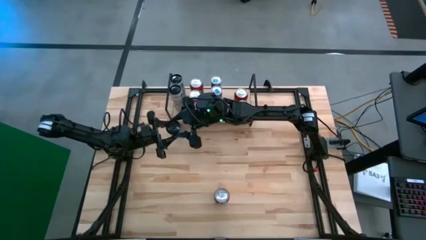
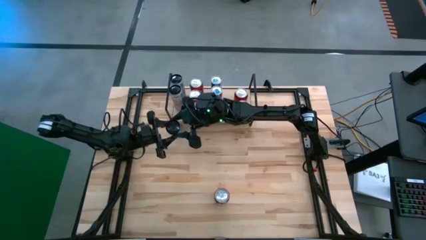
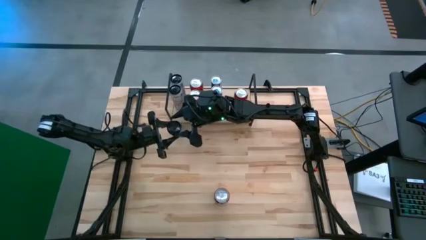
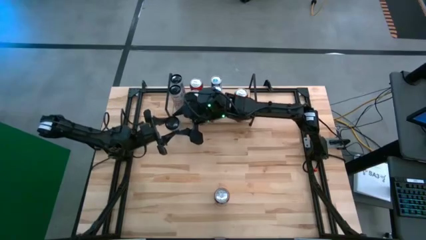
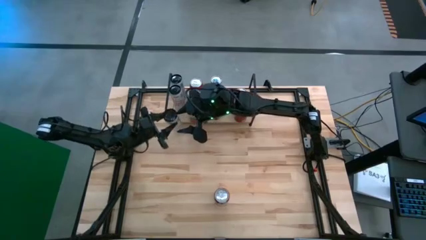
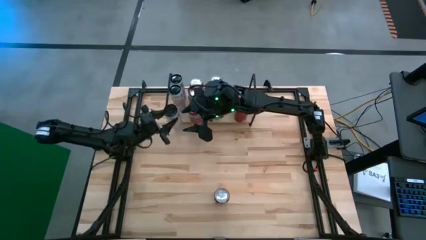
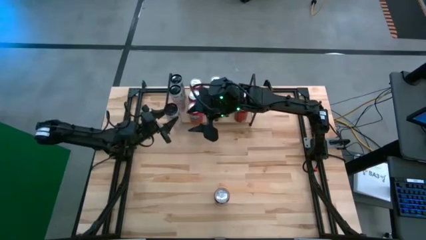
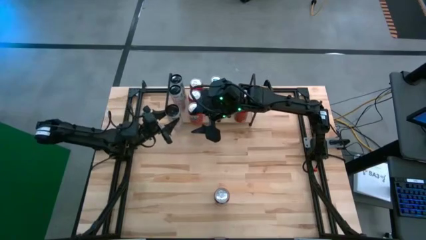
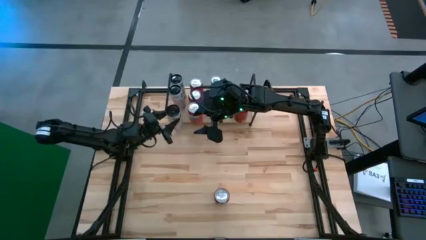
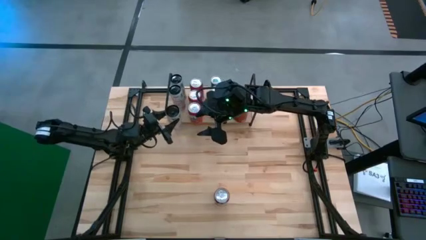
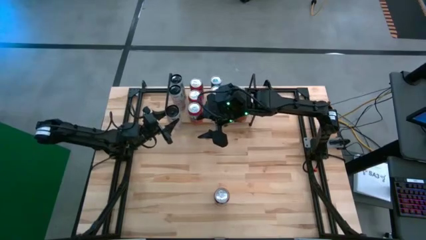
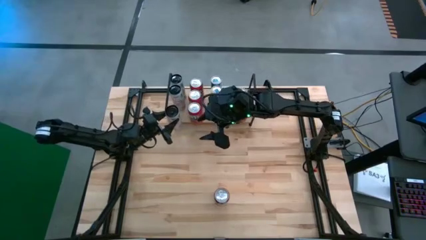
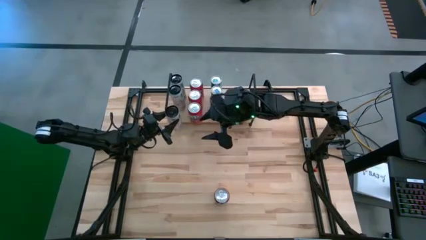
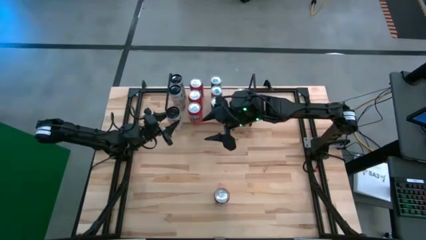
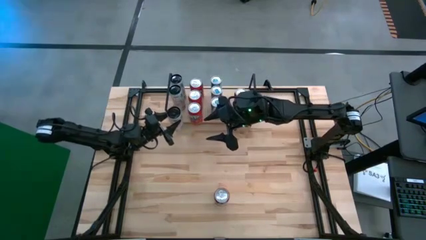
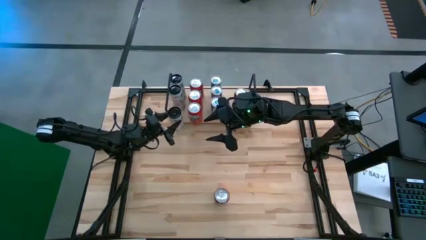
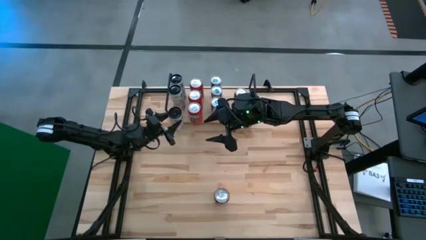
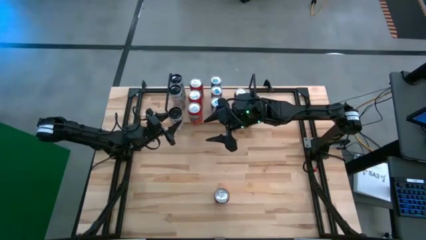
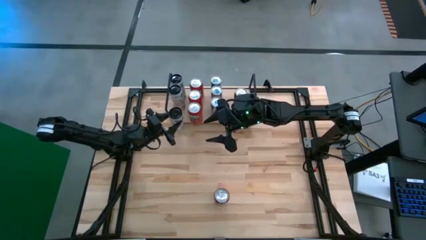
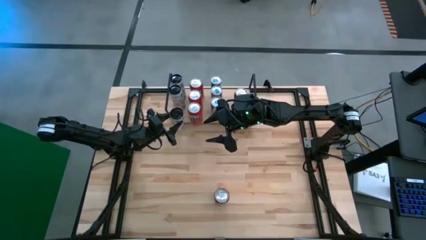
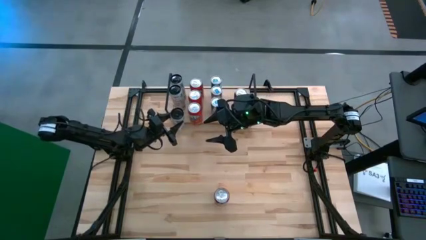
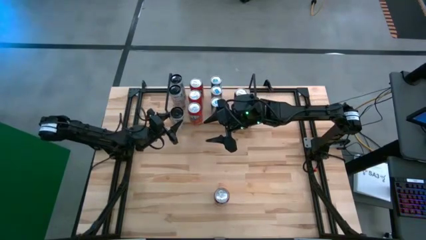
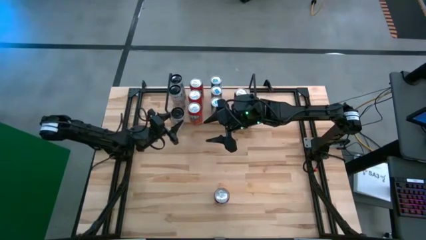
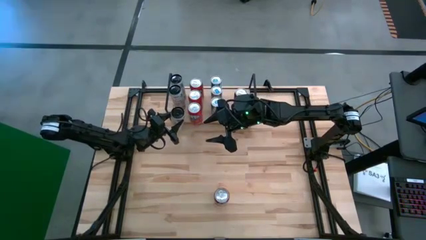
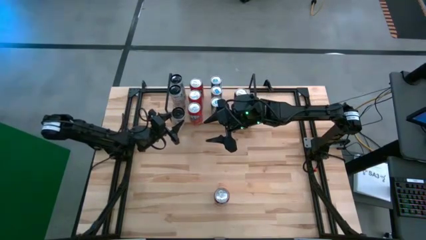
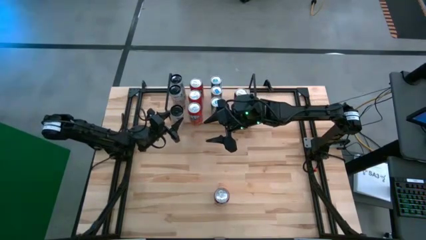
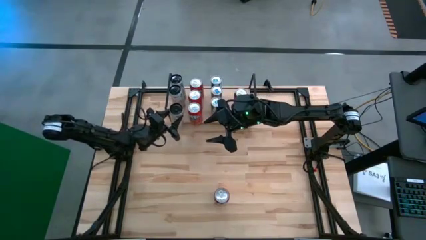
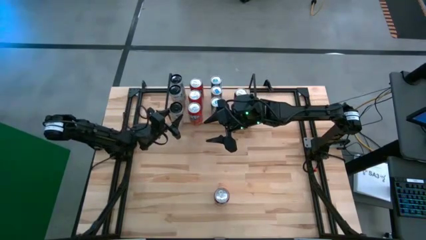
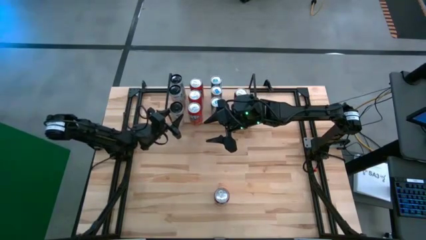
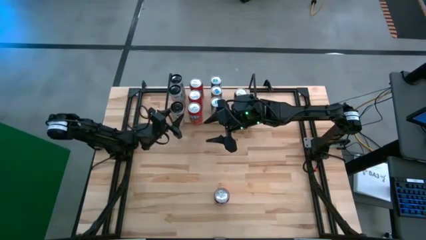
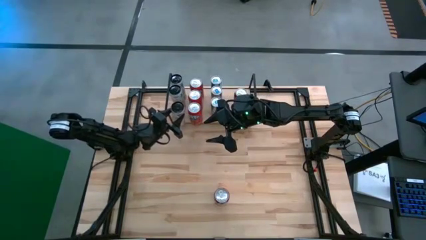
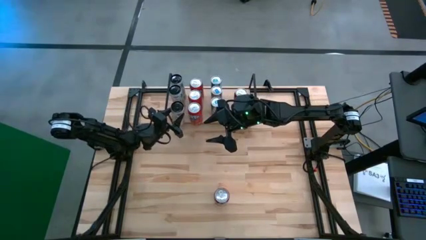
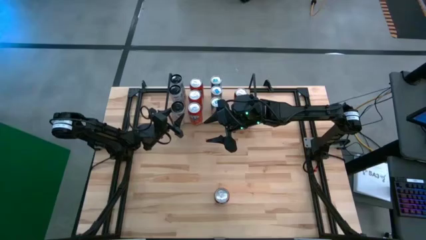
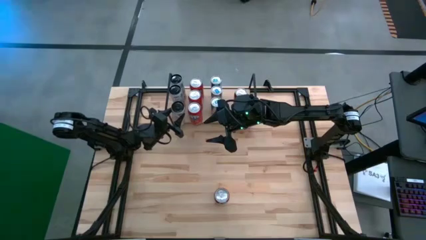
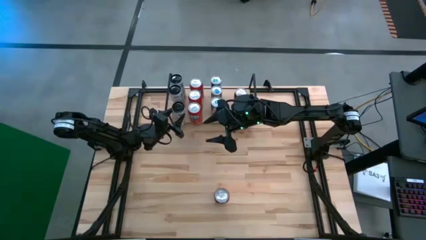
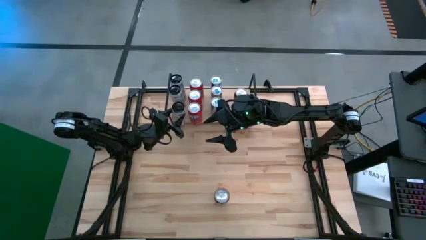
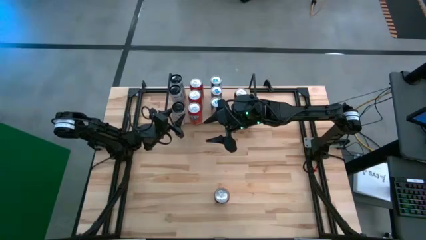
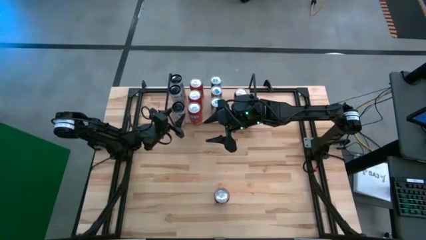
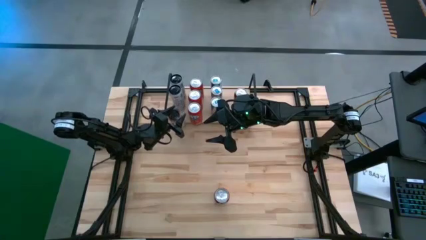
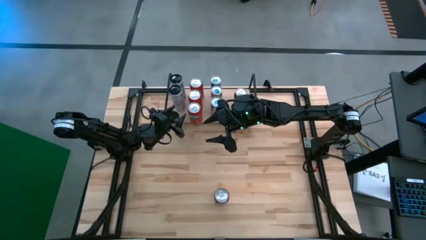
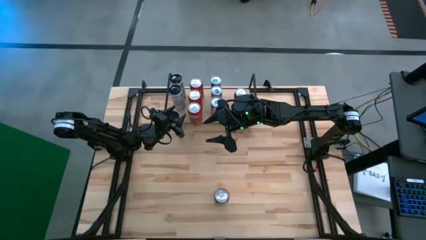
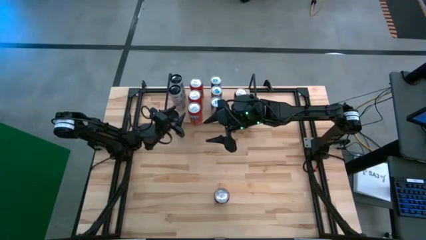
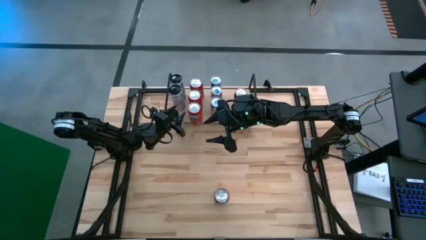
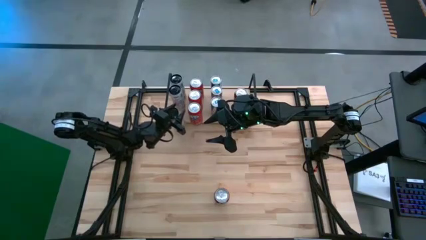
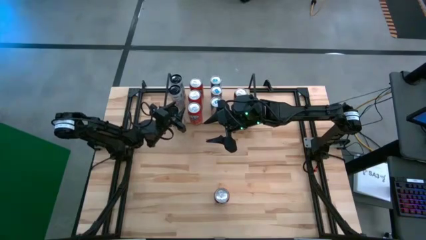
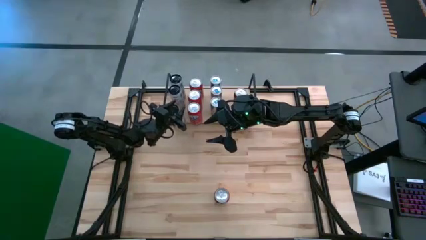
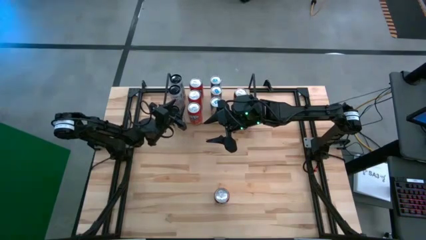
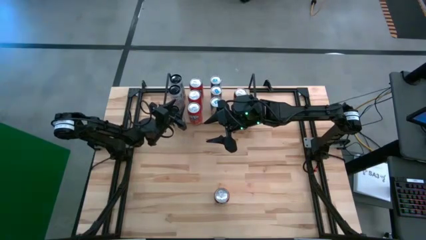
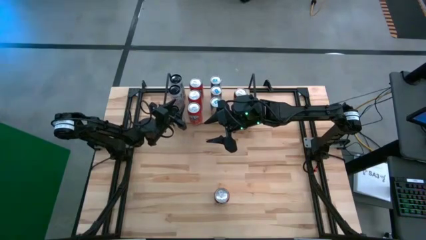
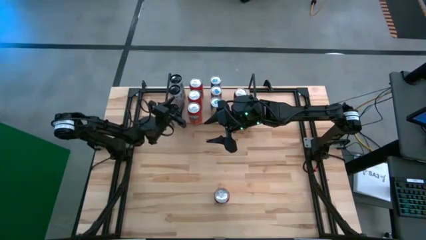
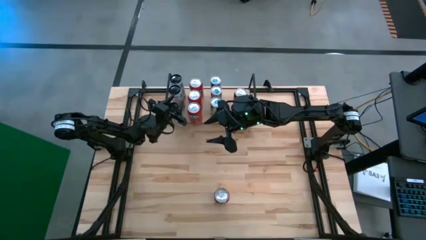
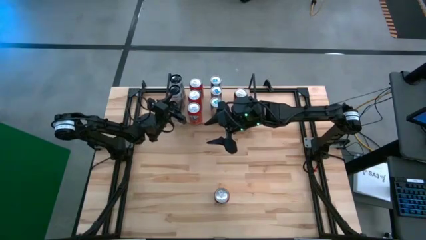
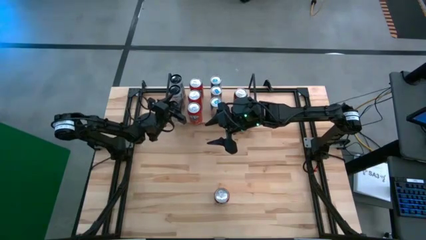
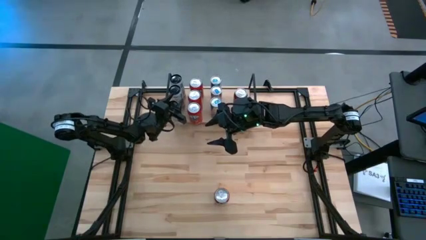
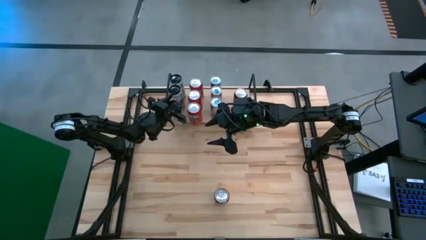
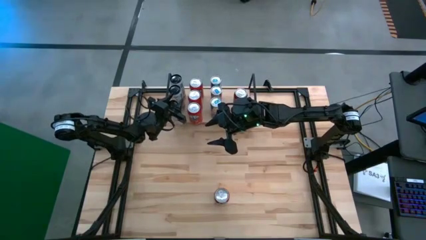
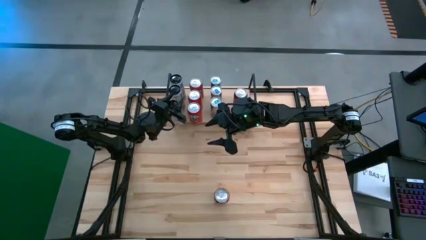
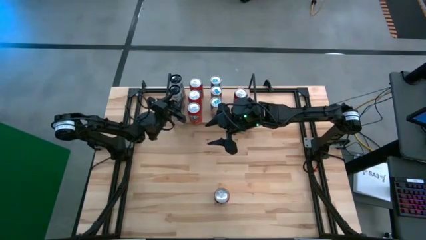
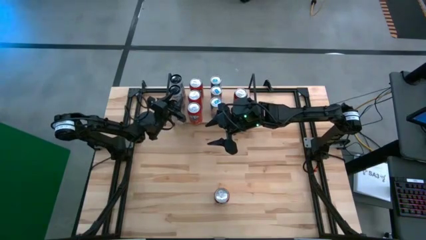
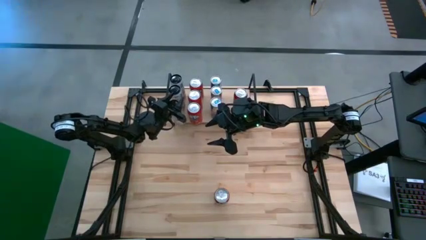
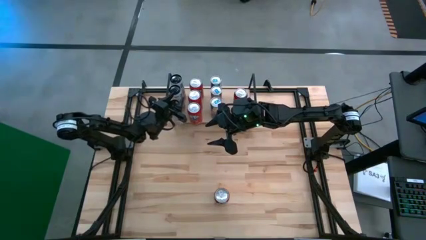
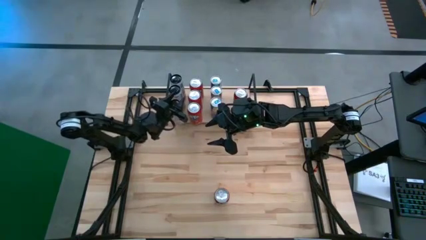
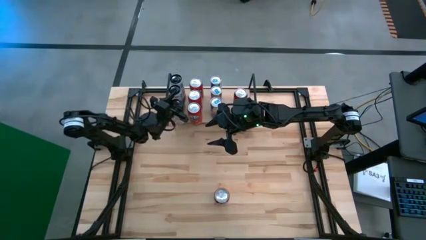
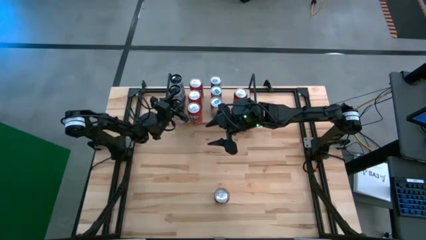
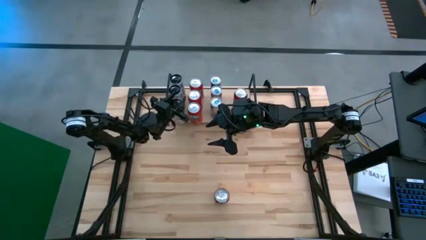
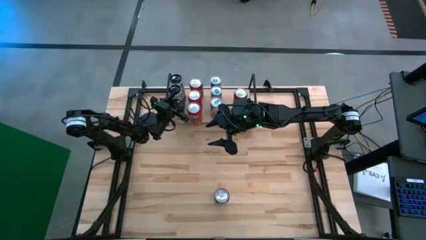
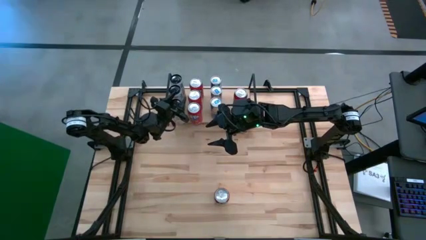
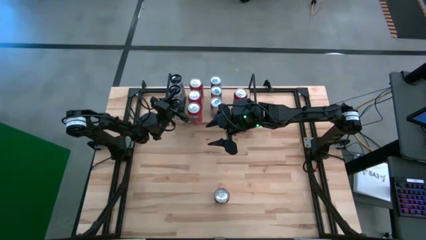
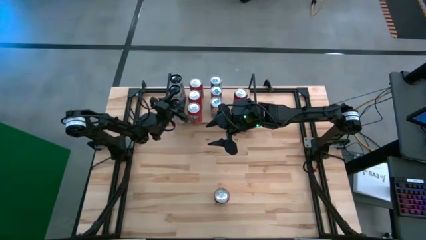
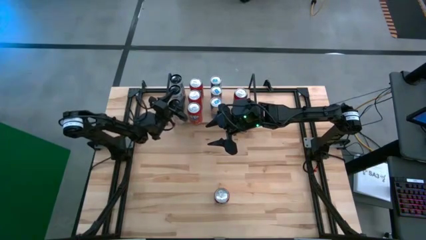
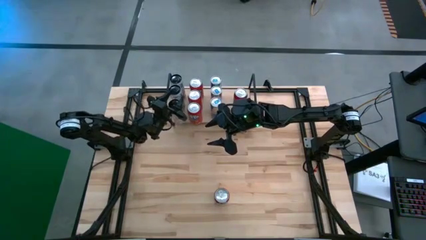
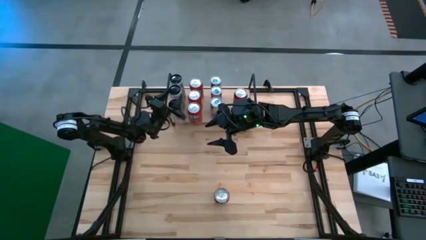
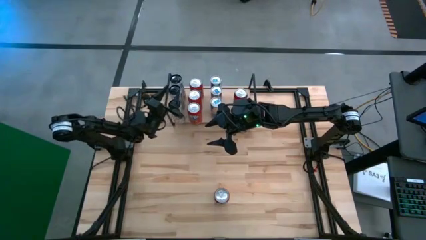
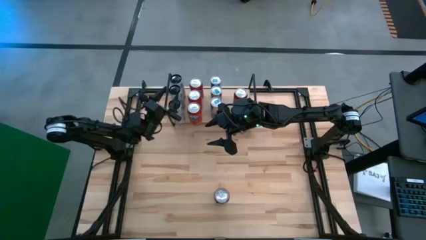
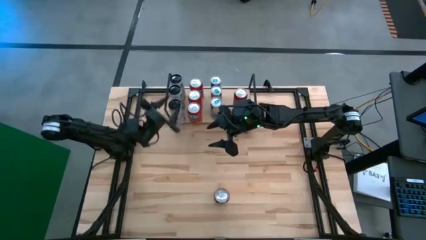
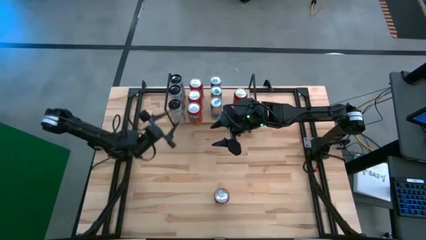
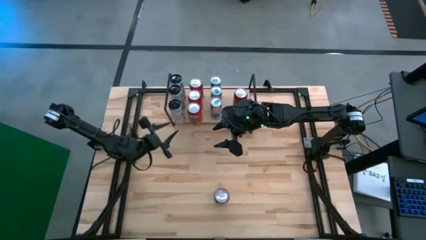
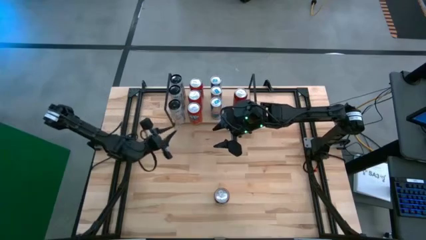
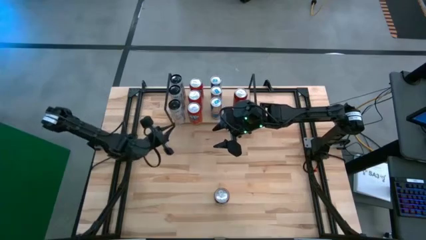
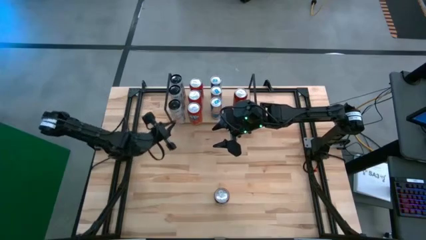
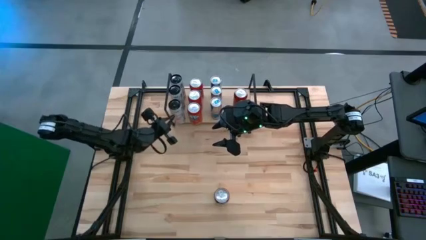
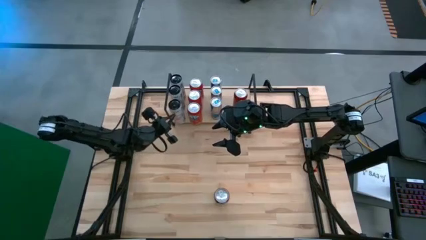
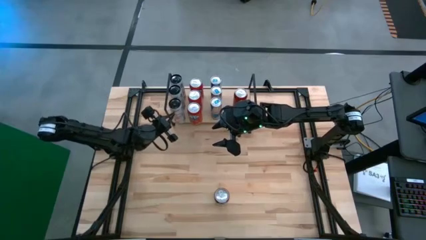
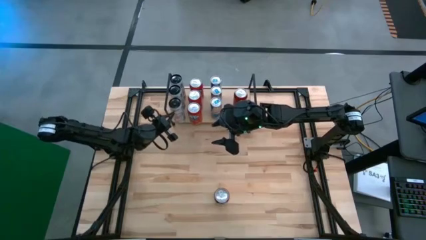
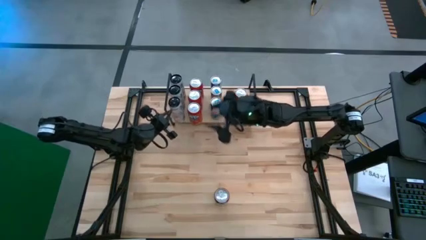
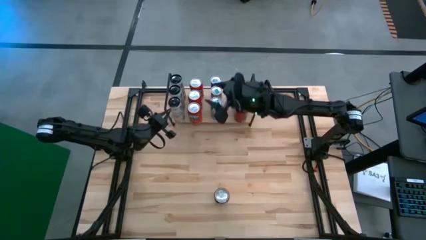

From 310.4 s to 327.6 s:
Task: Place canned beverage on shelf
Put the white soda can on the shelf aligned with the other white soda cans
